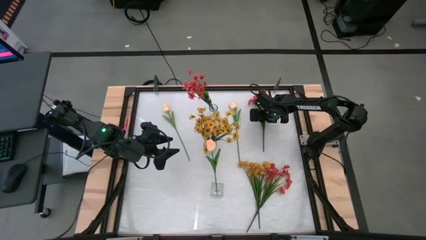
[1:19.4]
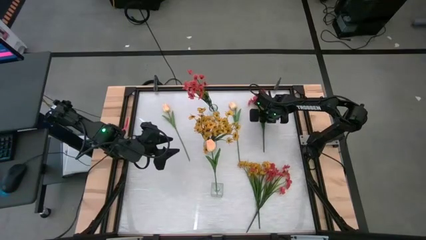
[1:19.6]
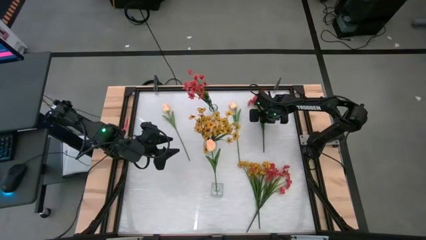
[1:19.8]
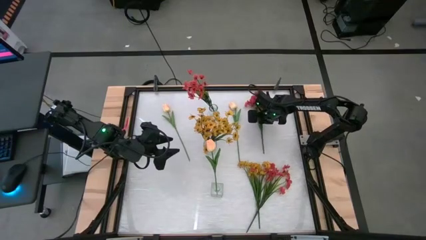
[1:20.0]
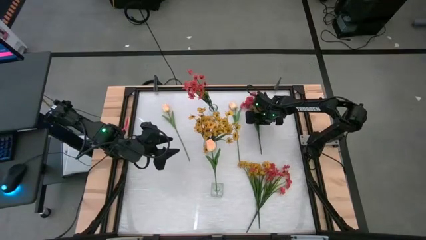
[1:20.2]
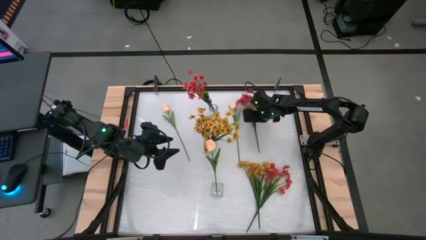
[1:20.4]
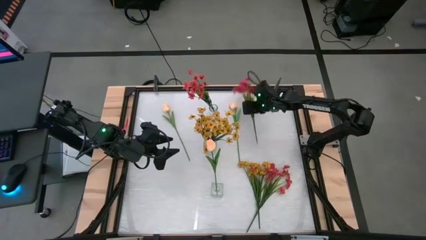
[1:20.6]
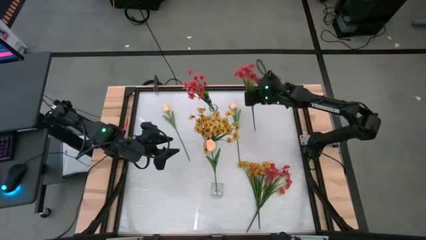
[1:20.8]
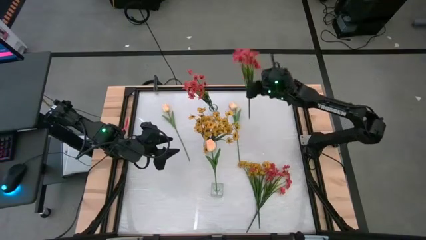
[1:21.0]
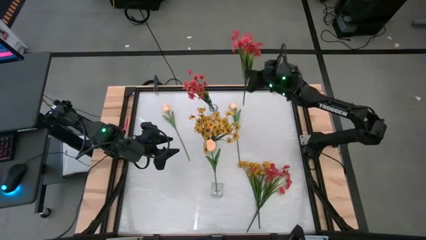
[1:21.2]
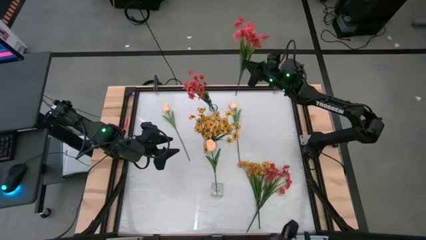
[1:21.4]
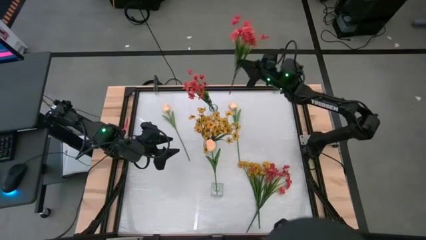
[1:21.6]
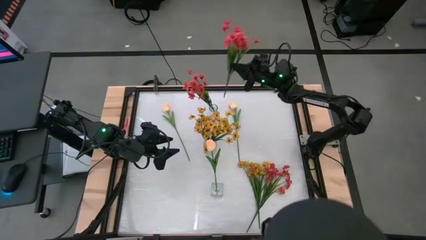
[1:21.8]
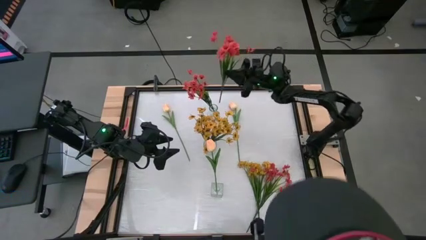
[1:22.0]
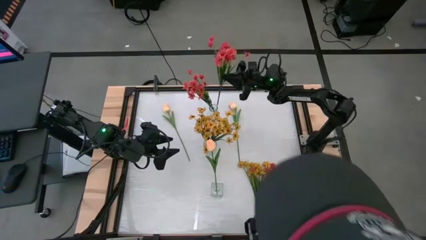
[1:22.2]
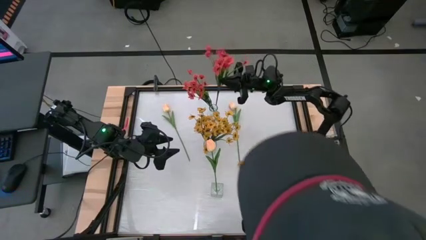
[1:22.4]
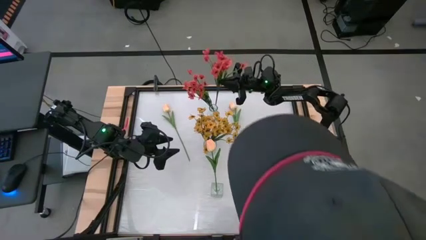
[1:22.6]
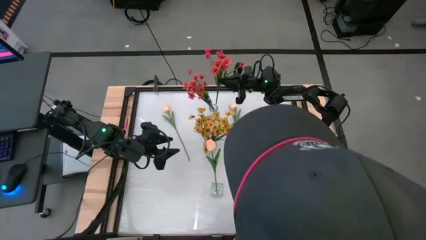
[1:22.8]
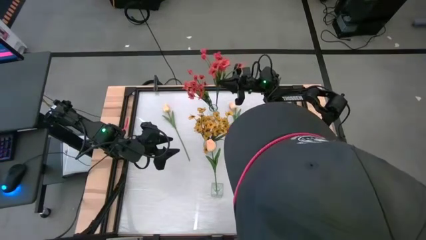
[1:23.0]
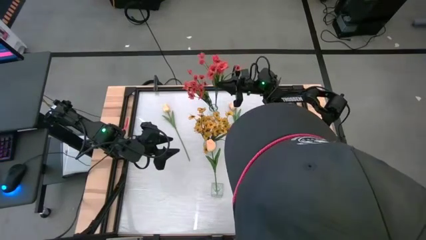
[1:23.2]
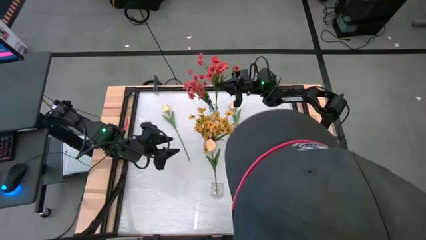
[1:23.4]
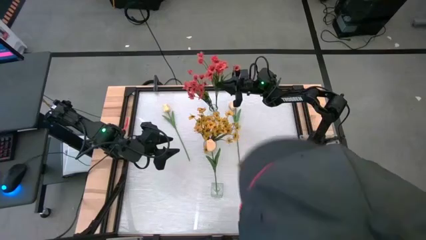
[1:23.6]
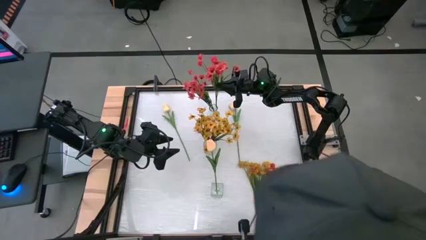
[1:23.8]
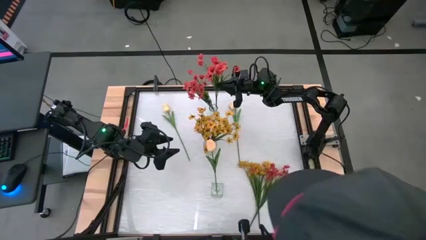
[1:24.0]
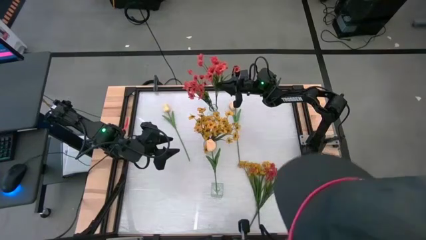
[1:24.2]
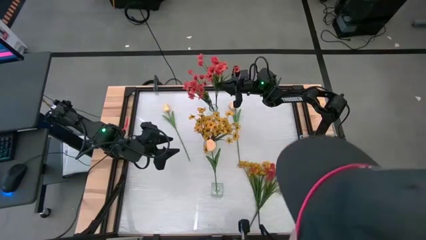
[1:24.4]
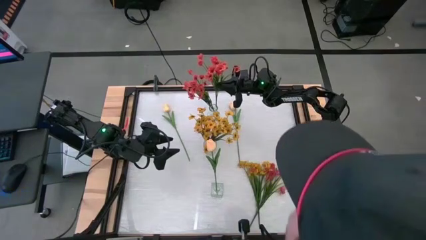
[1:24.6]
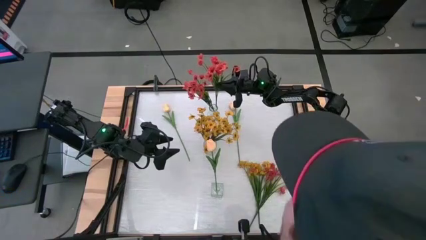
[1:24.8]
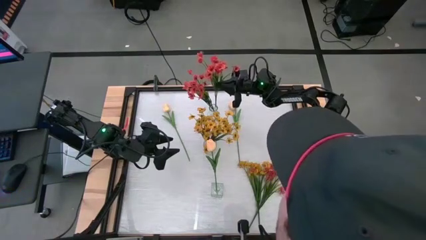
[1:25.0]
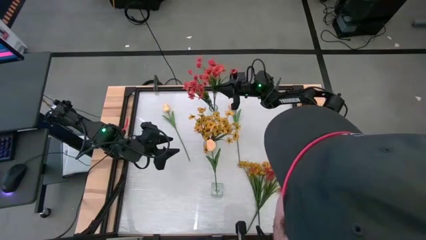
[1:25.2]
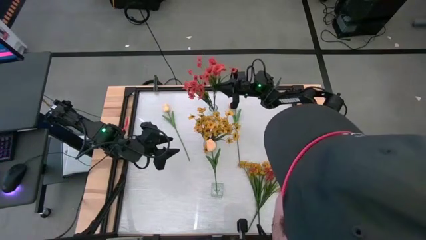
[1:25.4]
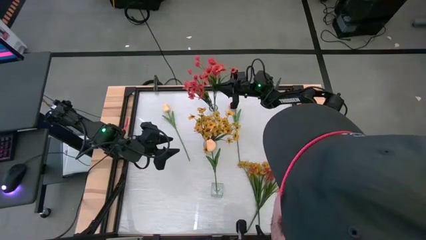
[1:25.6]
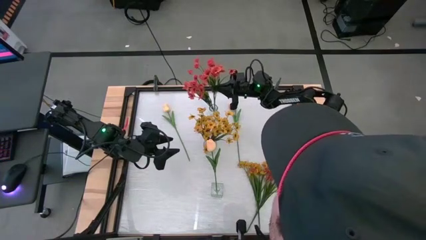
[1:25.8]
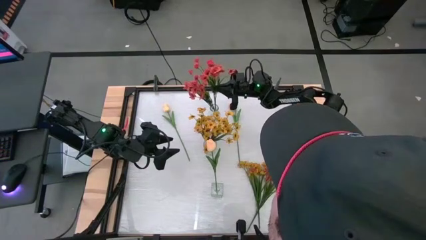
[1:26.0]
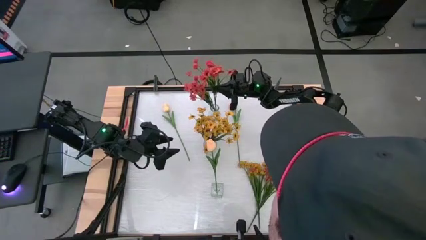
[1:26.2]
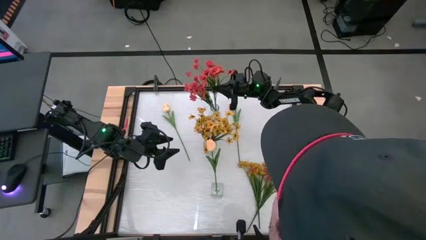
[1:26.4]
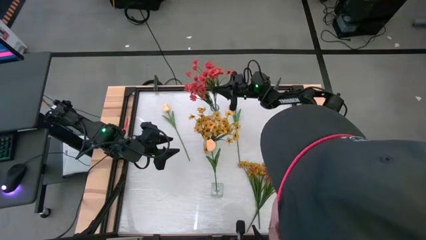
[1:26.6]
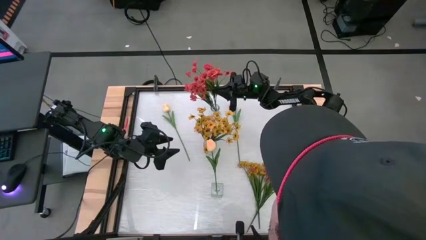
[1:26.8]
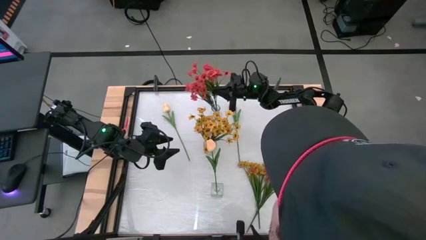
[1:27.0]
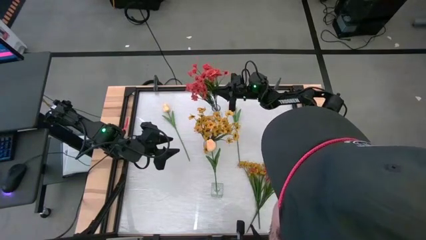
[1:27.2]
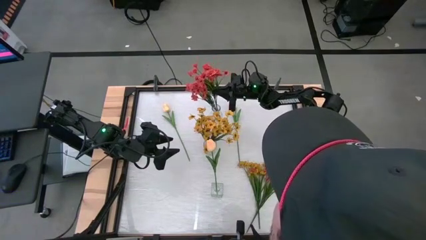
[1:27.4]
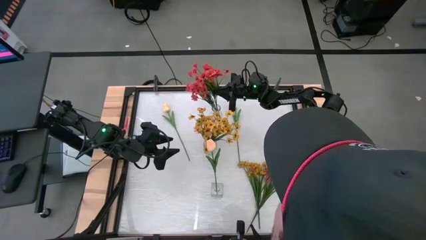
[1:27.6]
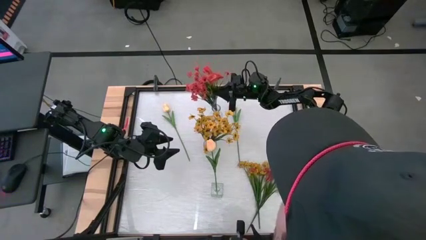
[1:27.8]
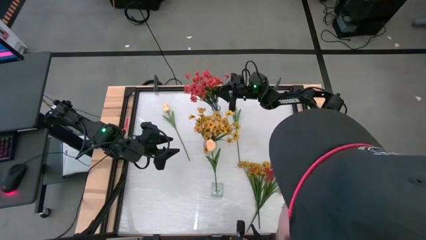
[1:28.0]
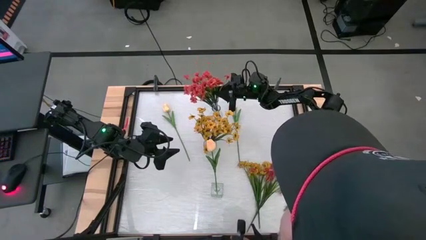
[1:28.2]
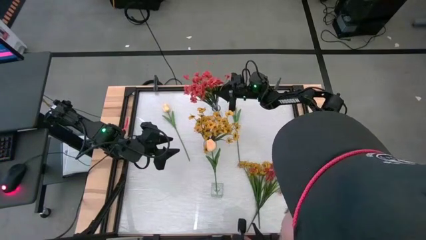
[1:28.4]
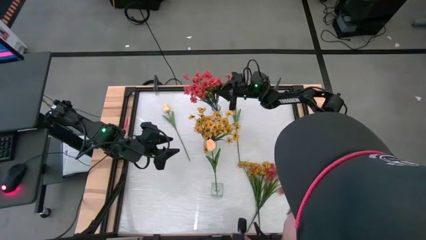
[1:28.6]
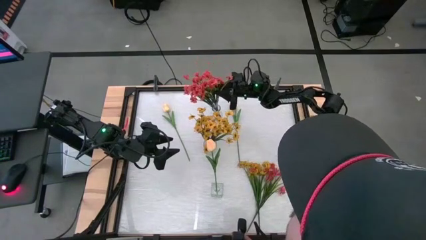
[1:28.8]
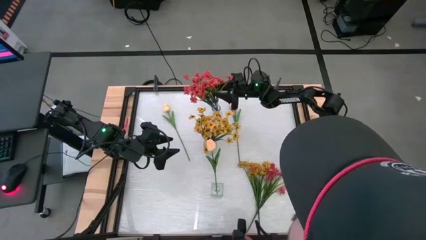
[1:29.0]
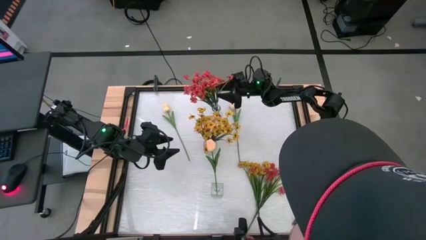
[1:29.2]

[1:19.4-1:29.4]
Task: Sort flowers into vase by color
Put the top red flowers into the top transparent vase

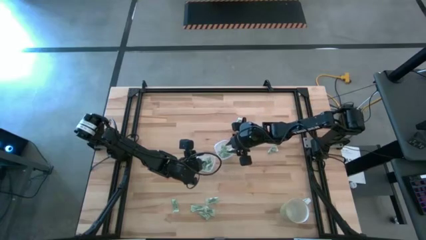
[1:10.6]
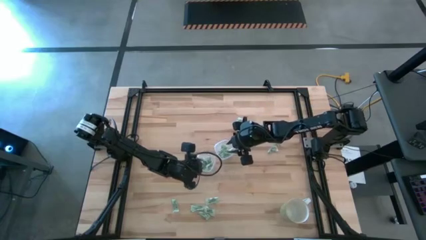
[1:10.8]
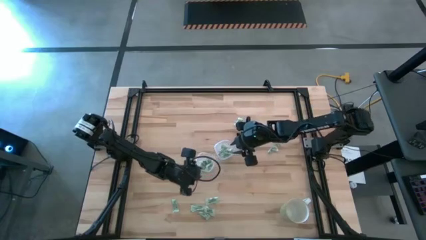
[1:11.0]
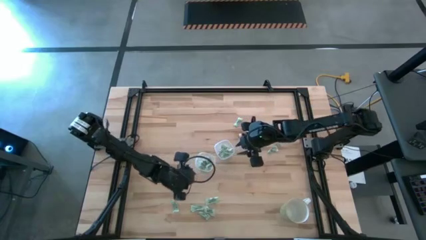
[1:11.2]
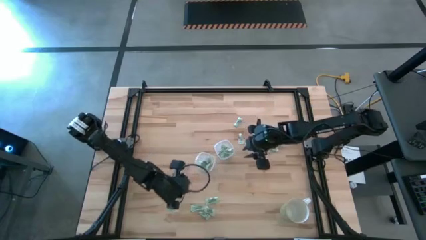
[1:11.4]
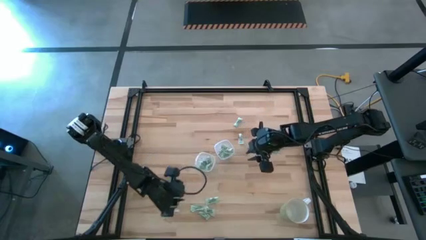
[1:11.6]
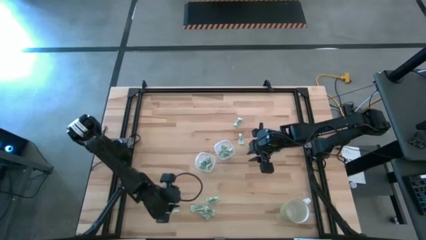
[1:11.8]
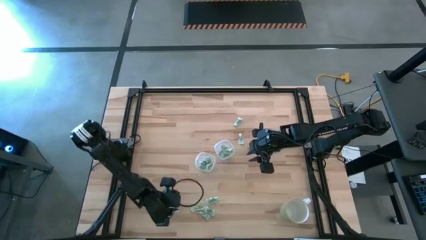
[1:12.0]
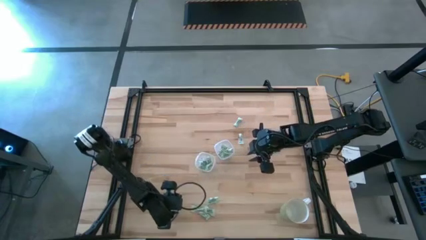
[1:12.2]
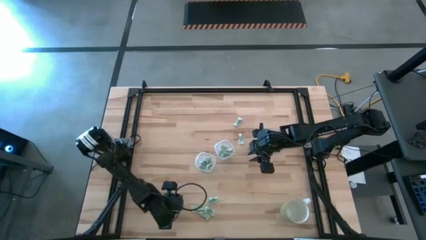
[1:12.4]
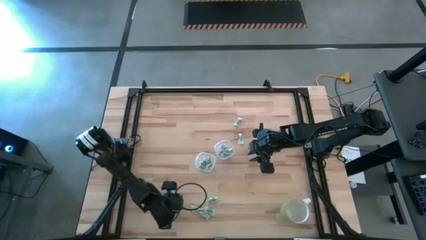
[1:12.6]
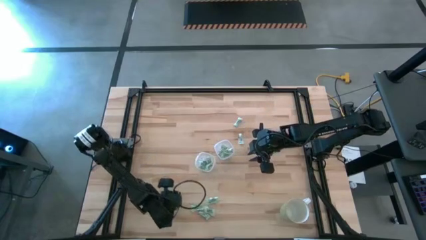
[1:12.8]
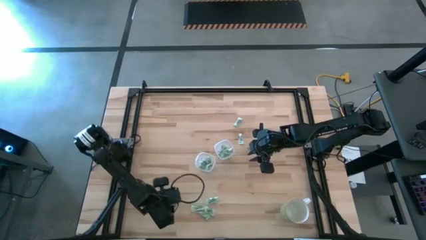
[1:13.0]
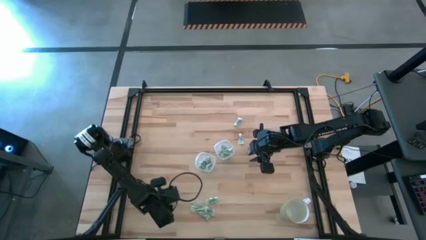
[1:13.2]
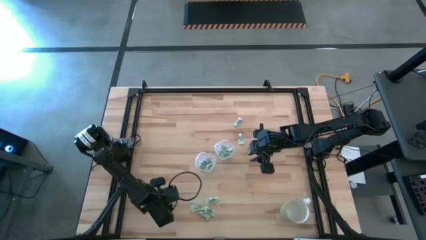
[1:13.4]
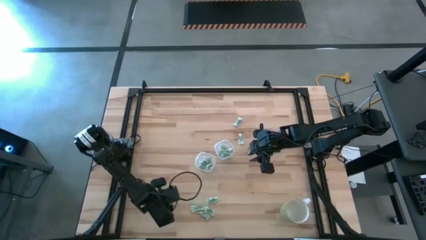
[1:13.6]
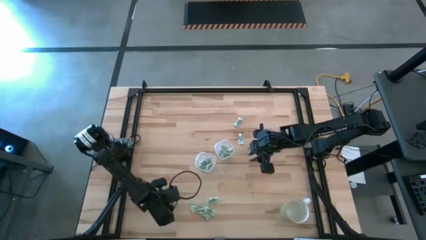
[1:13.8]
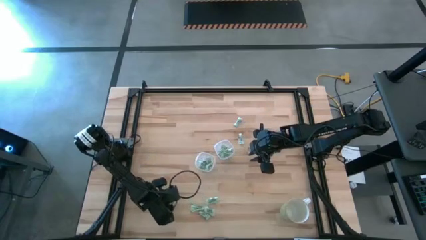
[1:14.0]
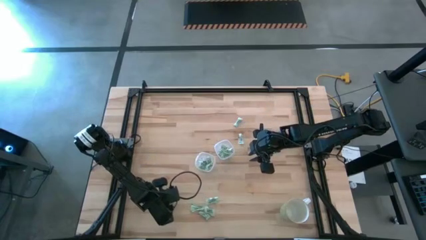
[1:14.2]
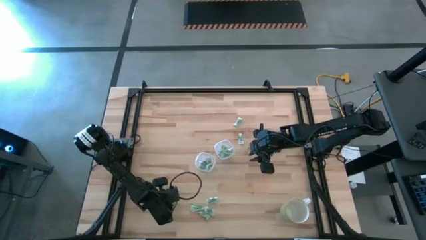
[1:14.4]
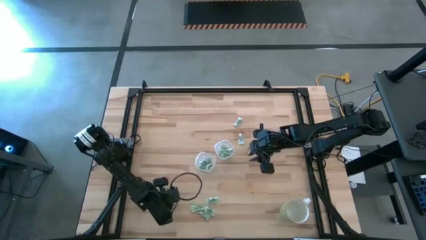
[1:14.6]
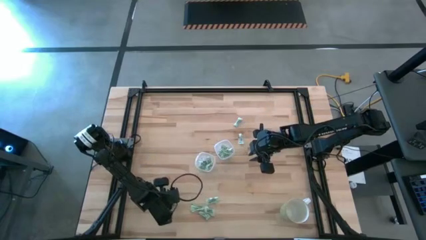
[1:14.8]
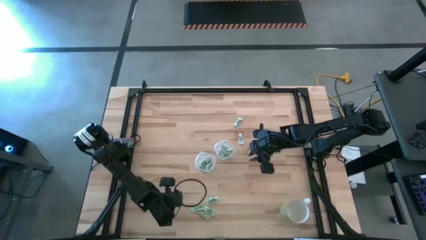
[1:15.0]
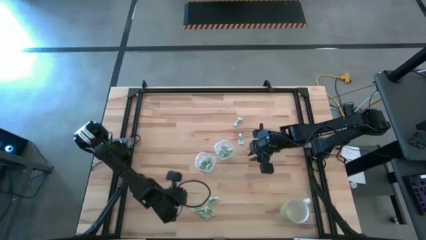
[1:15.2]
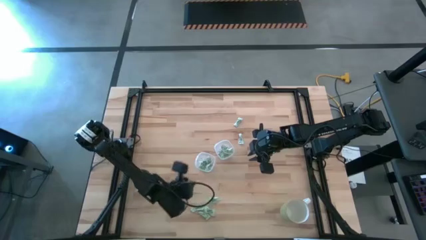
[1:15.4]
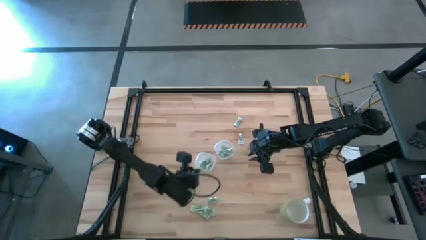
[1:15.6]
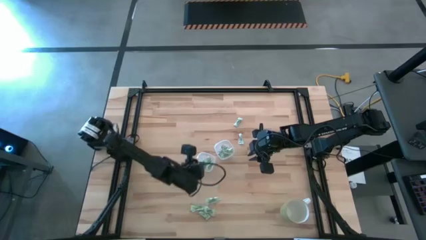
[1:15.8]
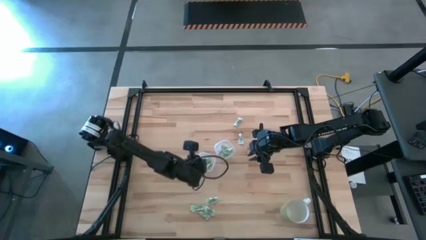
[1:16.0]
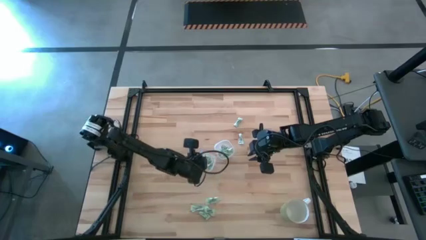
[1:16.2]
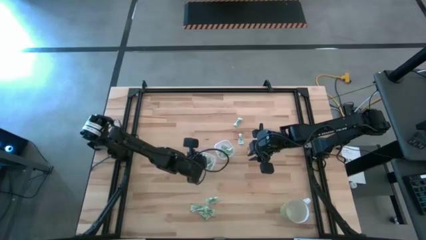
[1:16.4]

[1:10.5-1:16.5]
Task: Pick and place items into bin
Put the stevia packet into the left bin

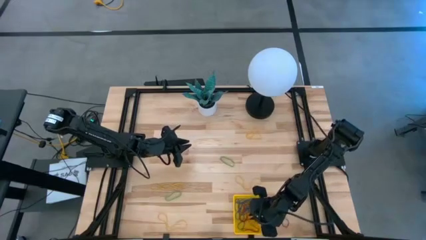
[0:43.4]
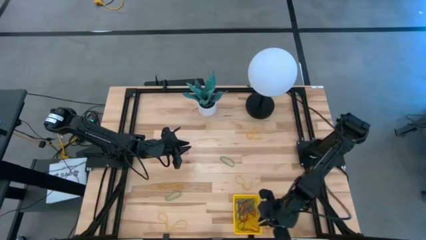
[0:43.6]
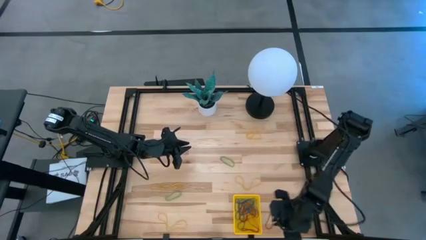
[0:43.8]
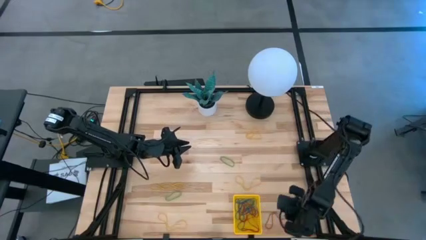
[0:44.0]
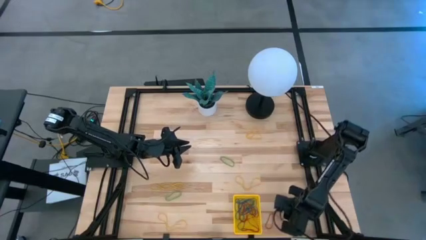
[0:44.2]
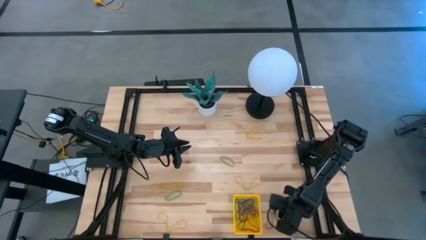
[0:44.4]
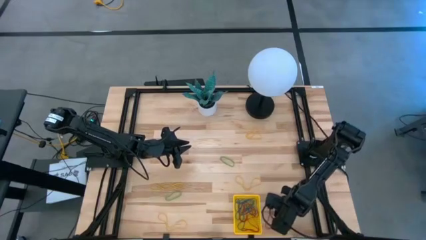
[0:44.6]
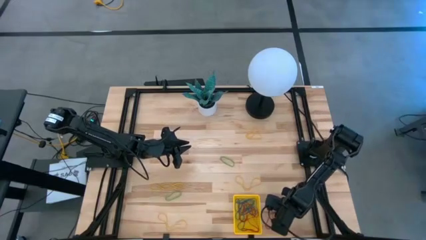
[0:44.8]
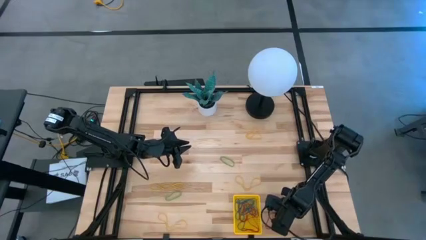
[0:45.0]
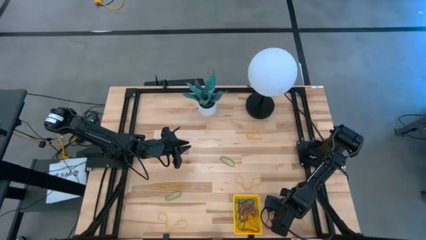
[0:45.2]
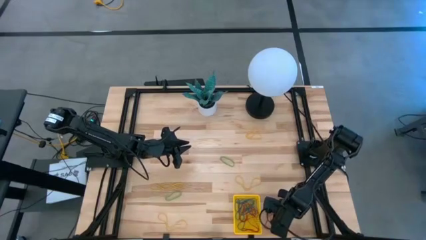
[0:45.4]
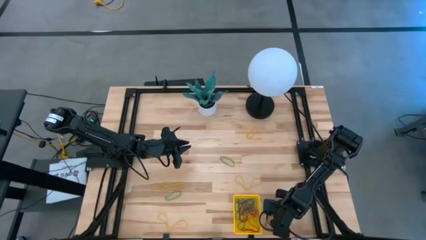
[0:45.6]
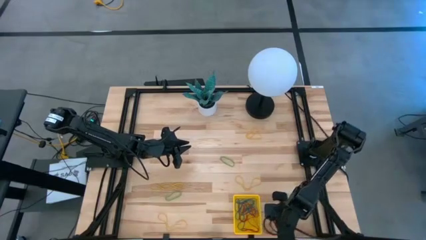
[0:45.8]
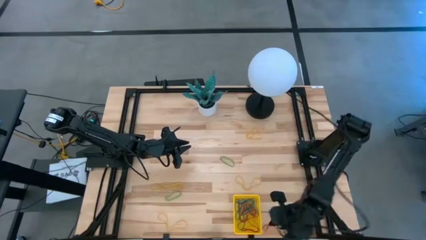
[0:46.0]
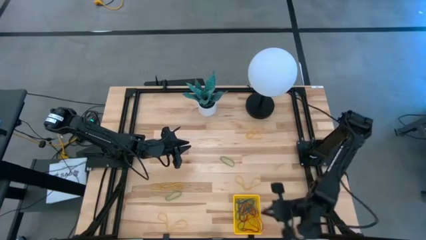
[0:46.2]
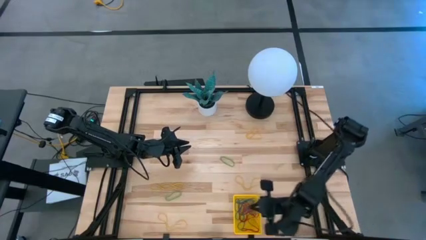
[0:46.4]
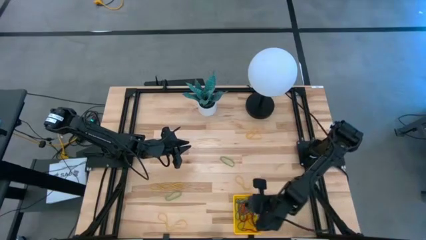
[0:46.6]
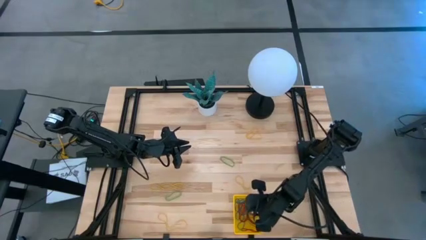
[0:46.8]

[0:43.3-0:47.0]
Task: Pick and place rubber bands into bin
Put the red rubber band into the yellow basket
